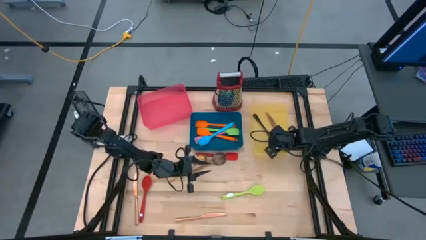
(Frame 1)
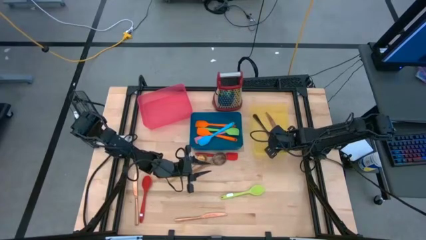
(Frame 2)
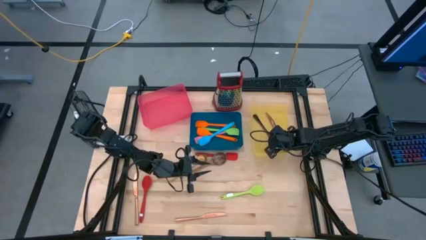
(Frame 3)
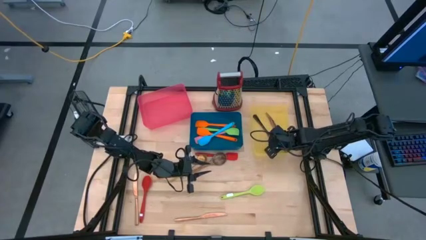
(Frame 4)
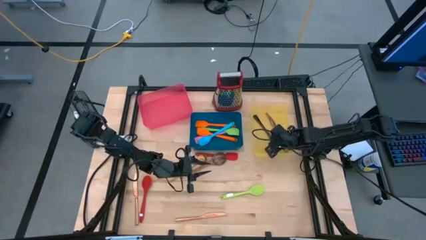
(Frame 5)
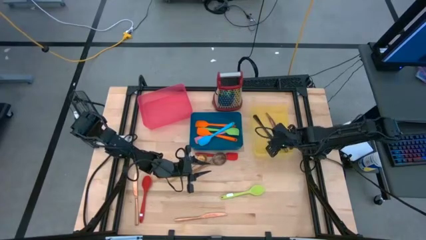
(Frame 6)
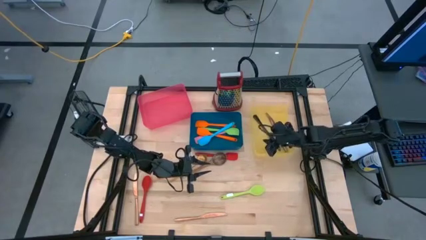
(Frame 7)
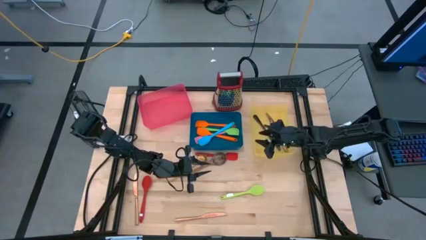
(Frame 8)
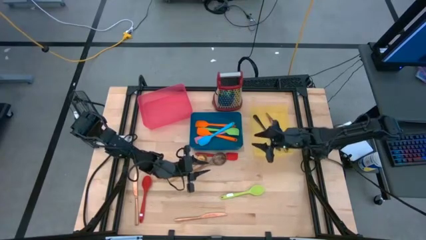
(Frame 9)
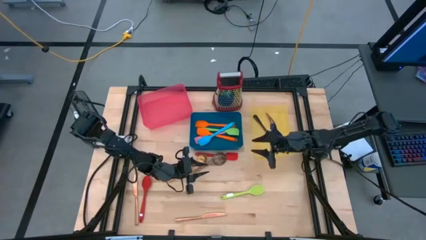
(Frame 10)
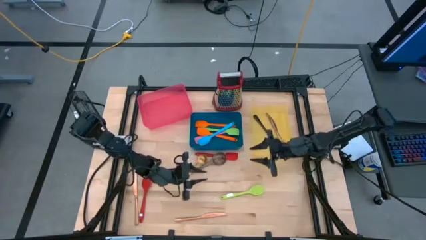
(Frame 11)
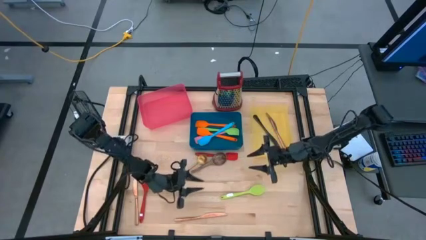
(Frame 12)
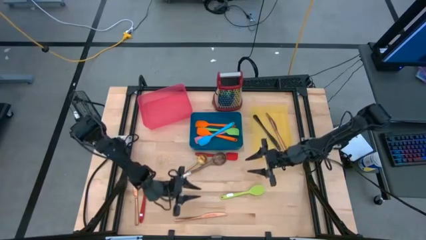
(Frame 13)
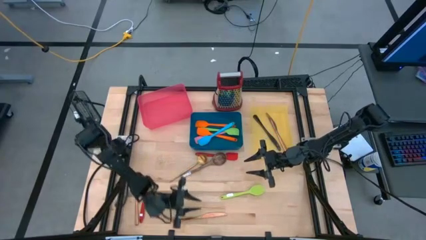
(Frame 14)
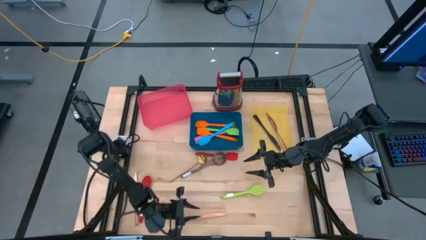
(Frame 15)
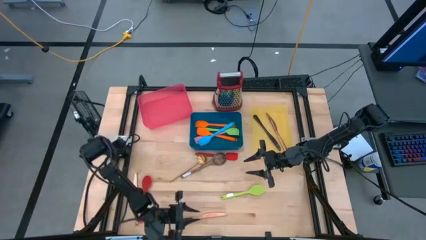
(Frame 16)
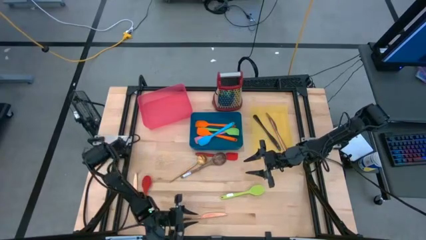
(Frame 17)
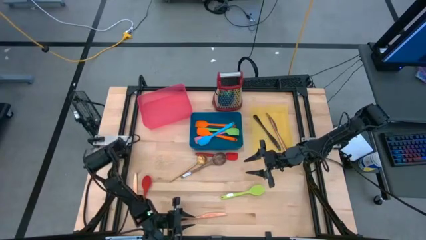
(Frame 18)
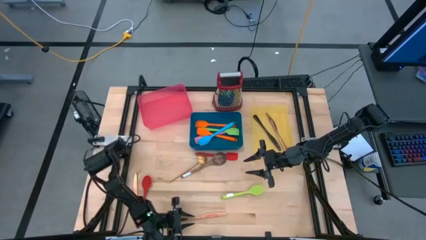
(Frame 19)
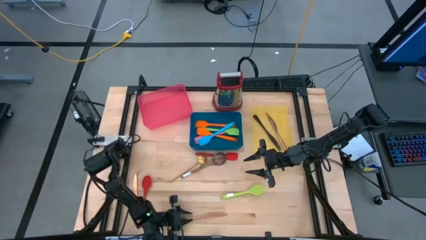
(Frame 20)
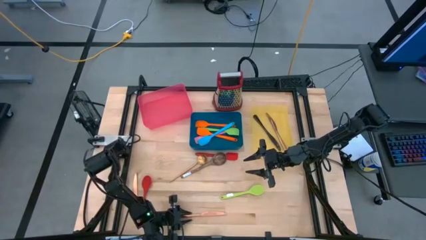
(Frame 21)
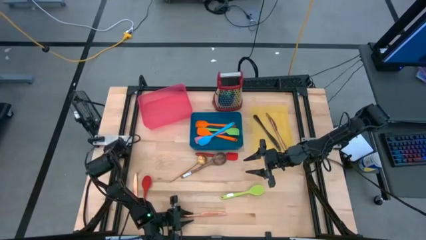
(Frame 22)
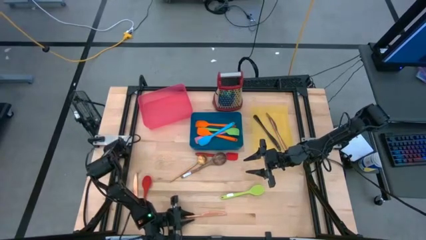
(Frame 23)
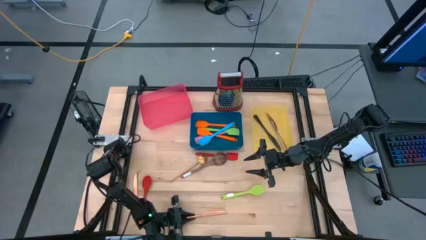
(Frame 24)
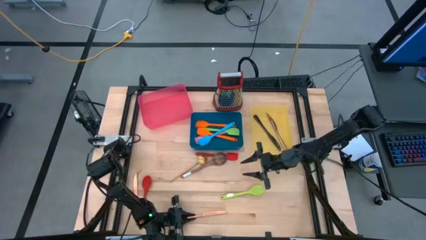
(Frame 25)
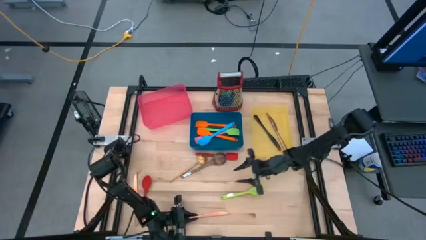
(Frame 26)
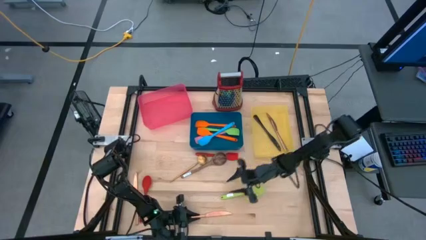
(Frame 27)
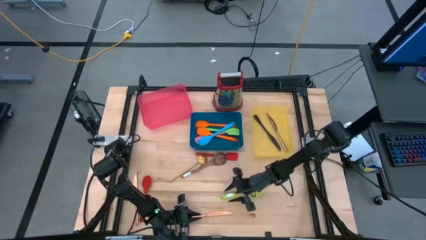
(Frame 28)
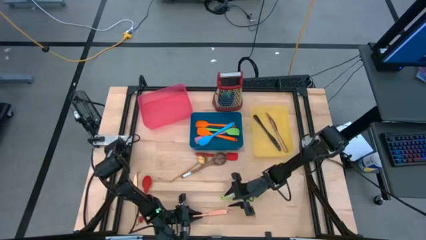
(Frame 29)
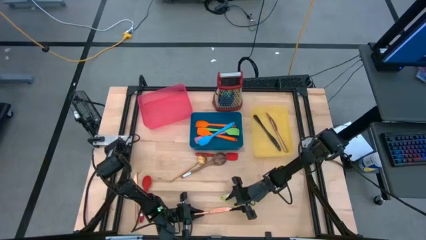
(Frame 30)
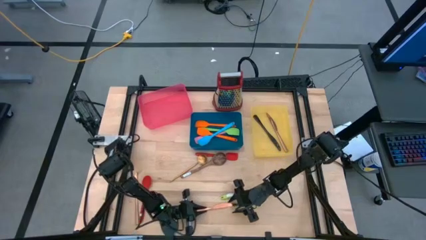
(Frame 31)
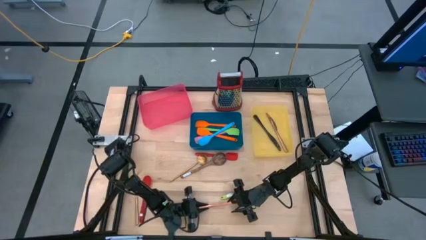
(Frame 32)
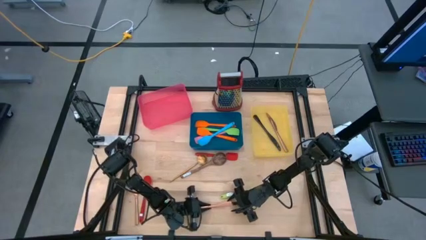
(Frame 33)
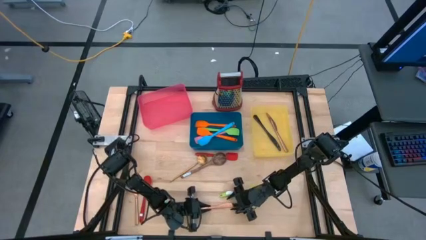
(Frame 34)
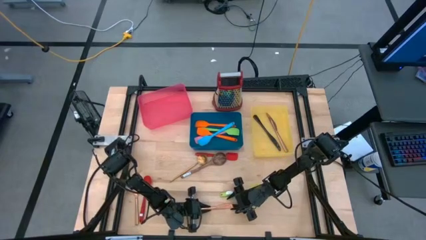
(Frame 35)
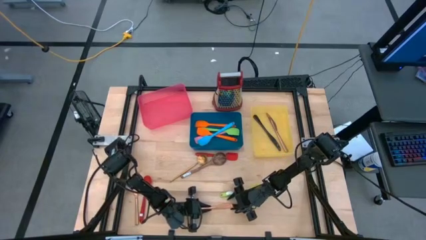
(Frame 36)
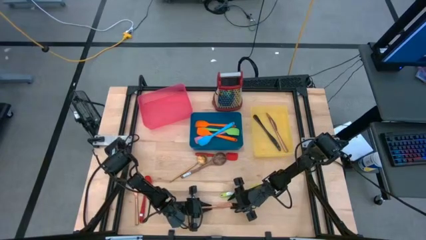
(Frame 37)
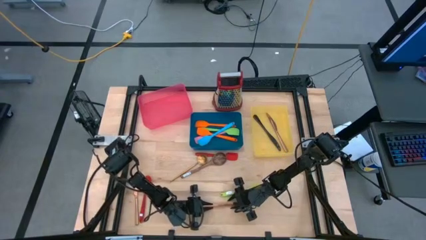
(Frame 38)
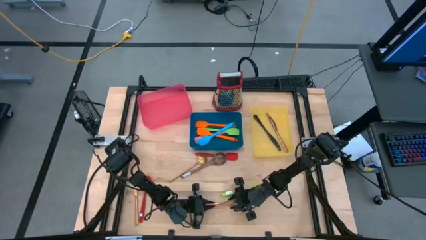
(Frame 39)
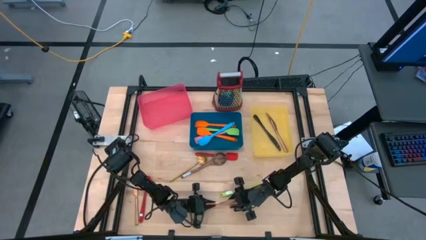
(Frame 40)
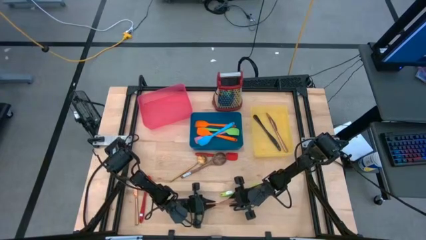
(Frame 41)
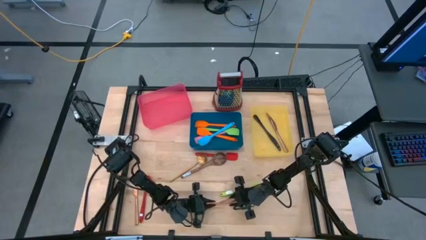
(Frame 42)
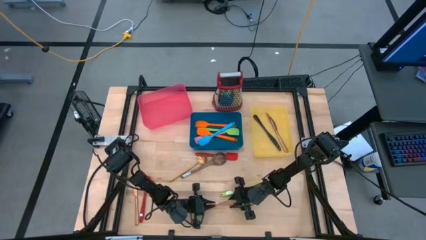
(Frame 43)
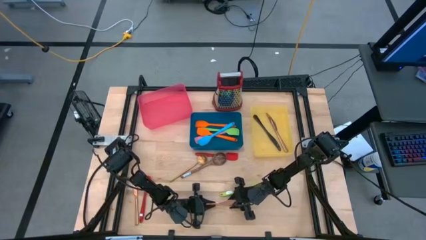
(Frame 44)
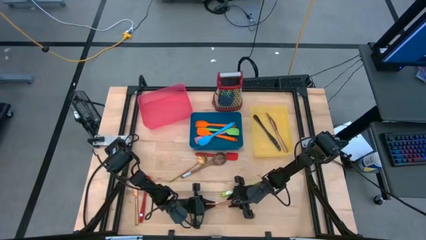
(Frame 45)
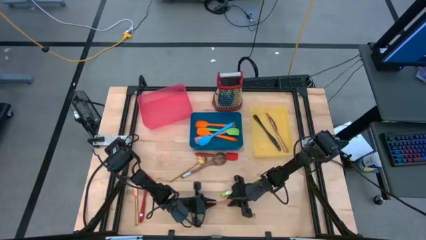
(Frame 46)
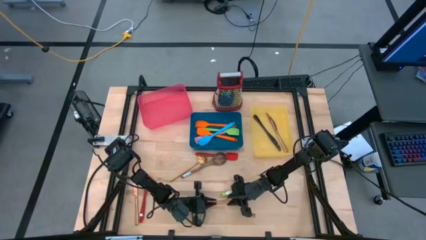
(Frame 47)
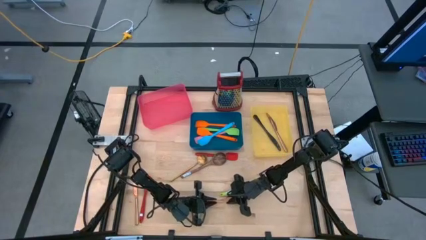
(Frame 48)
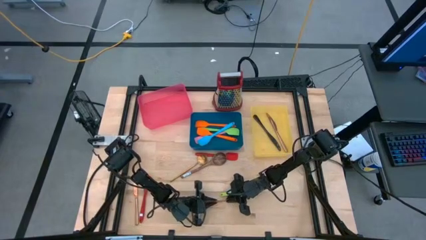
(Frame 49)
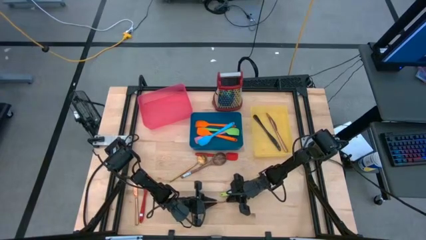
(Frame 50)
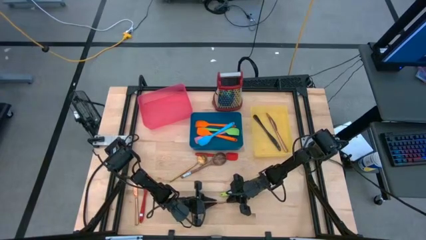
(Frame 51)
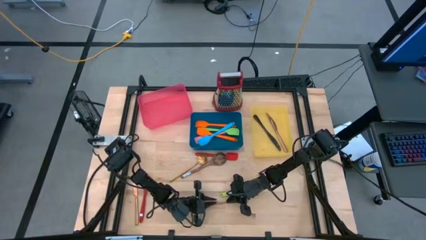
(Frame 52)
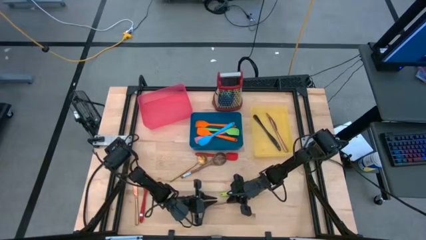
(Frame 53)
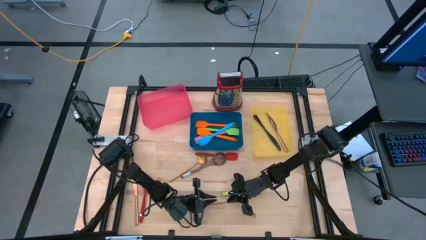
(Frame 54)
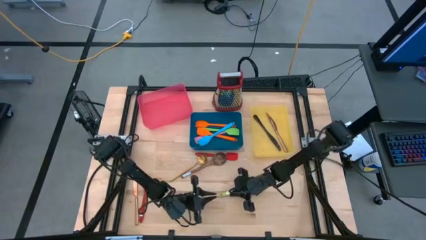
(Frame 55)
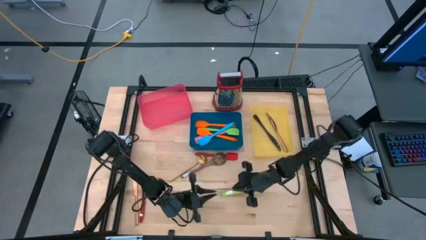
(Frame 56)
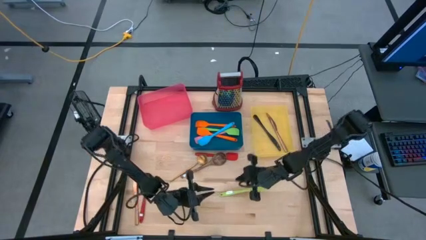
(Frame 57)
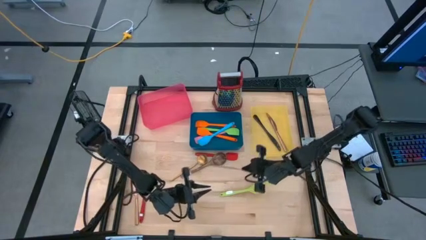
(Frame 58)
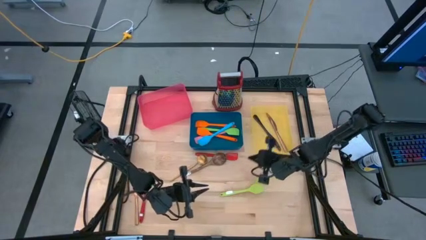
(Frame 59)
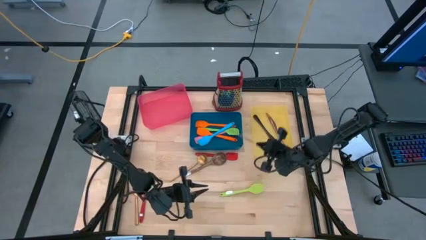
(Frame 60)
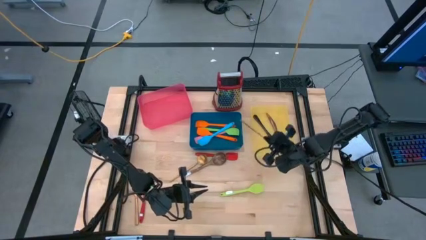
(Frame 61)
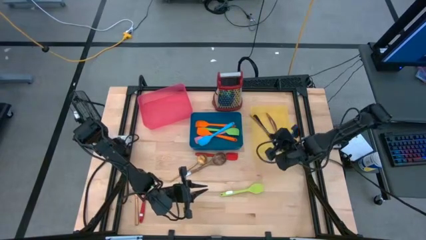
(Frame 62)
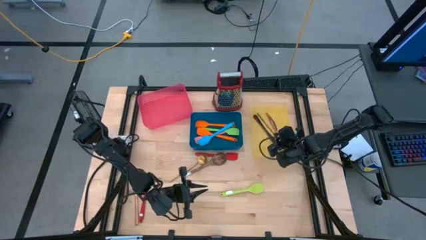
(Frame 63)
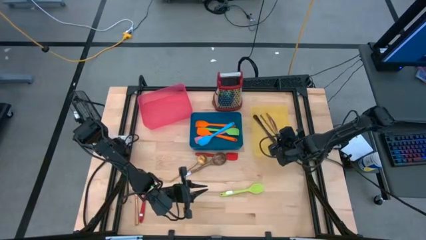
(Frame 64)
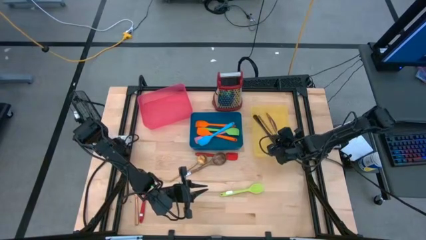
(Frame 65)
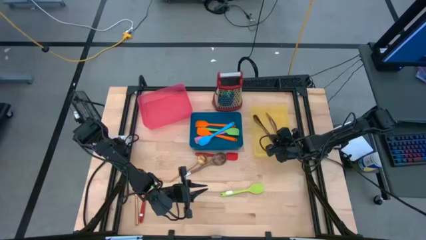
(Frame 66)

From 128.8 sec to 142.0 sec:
Task: Pick & Place Kitchen Items
Put the gold table knife into the yellow bin
